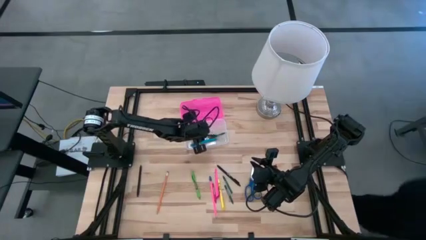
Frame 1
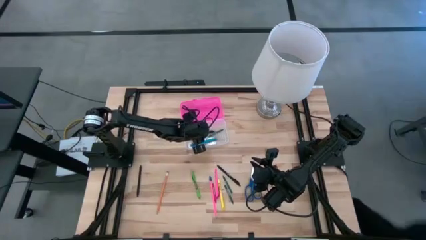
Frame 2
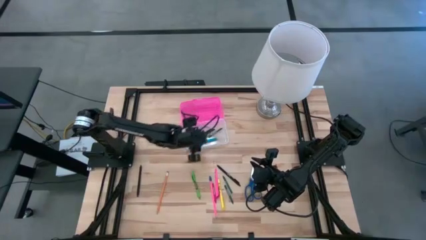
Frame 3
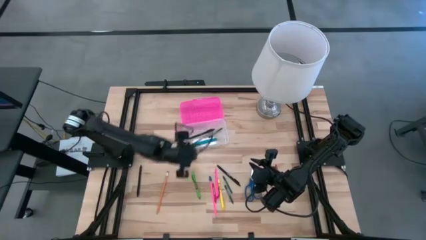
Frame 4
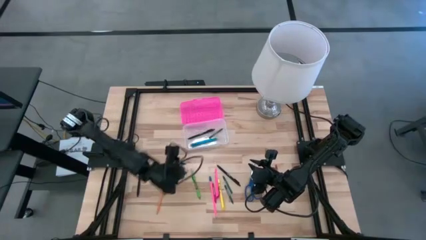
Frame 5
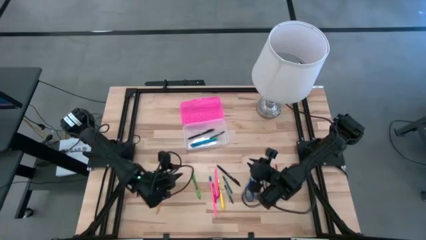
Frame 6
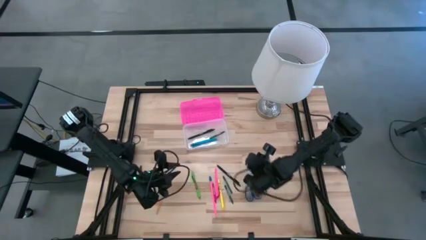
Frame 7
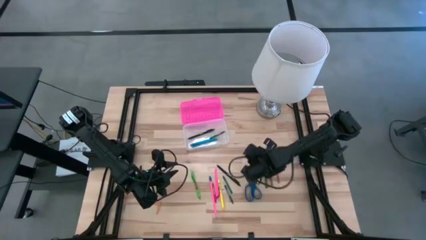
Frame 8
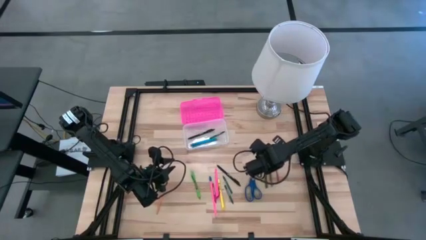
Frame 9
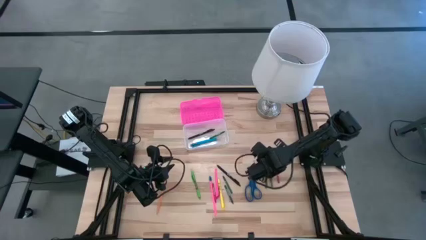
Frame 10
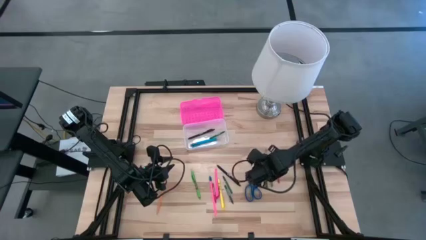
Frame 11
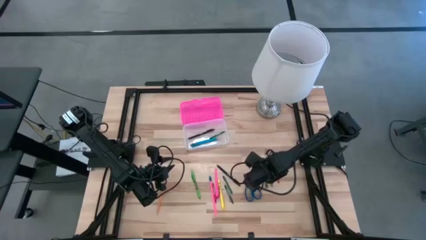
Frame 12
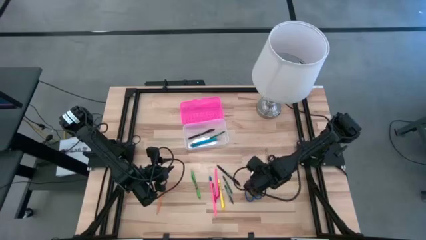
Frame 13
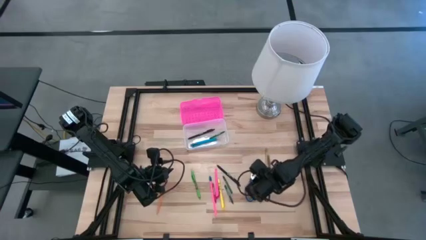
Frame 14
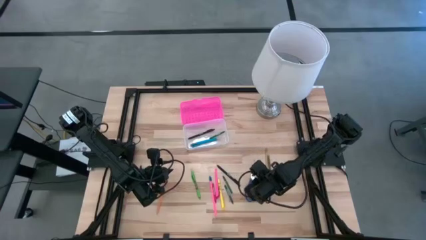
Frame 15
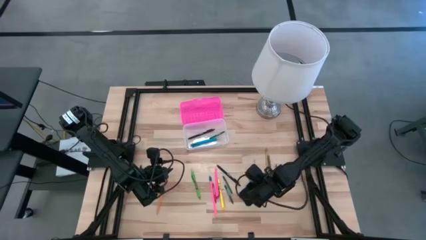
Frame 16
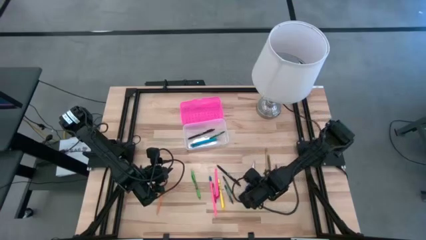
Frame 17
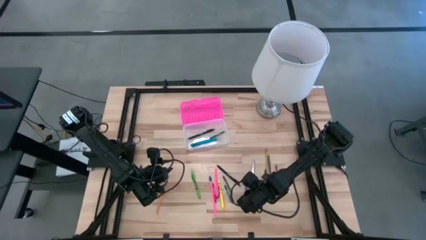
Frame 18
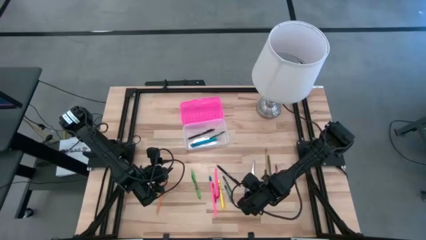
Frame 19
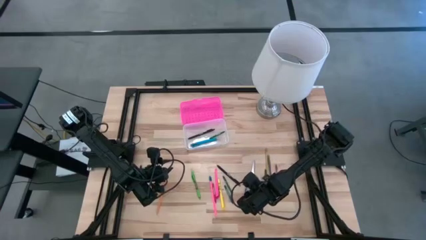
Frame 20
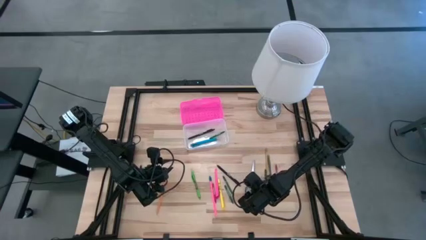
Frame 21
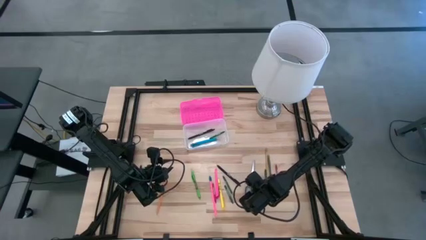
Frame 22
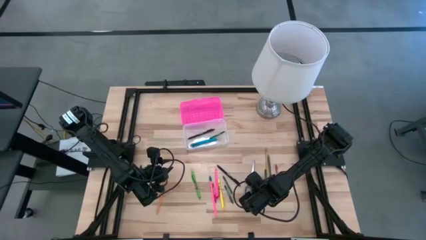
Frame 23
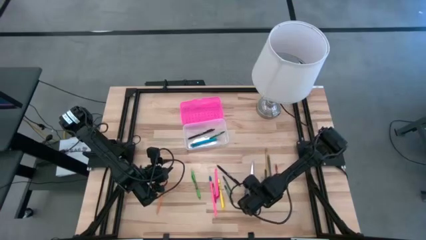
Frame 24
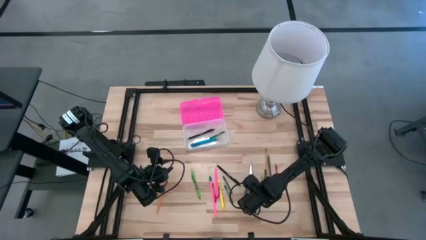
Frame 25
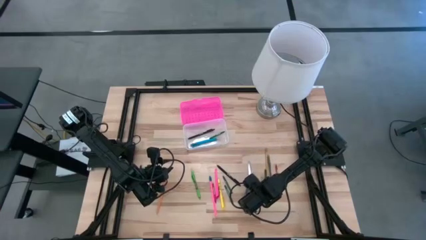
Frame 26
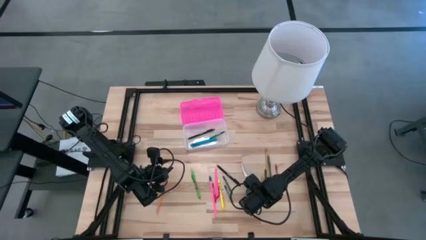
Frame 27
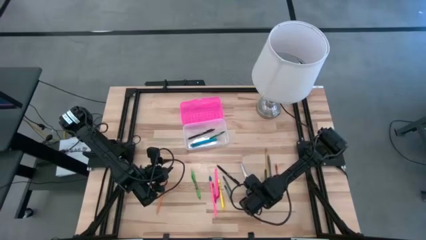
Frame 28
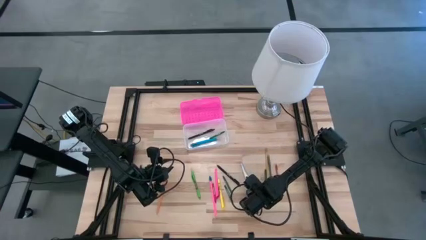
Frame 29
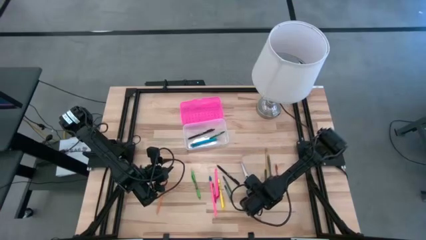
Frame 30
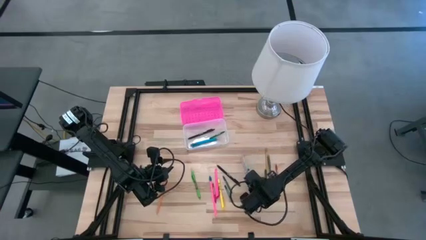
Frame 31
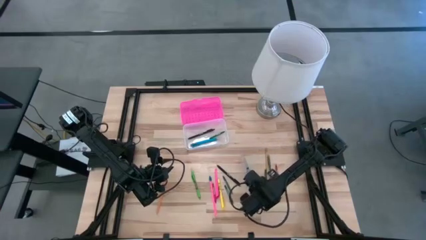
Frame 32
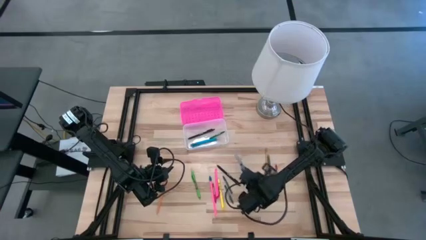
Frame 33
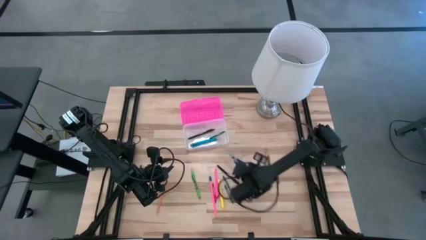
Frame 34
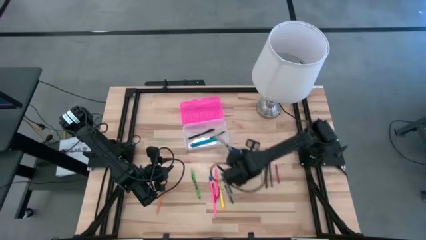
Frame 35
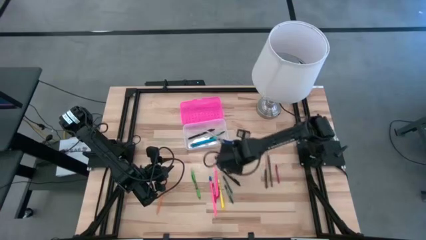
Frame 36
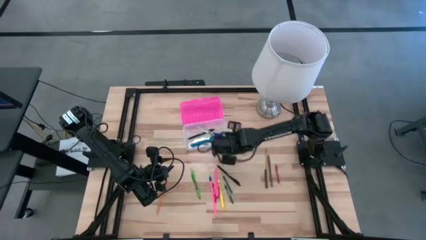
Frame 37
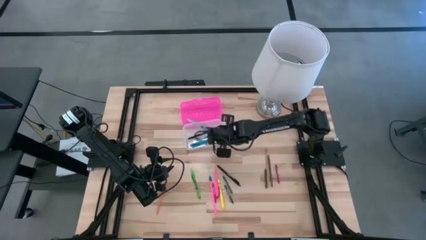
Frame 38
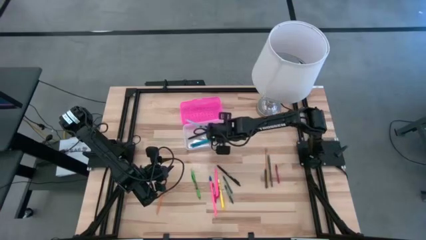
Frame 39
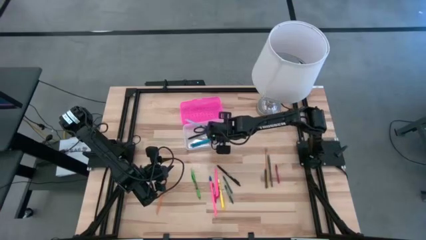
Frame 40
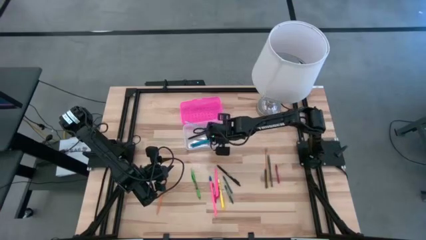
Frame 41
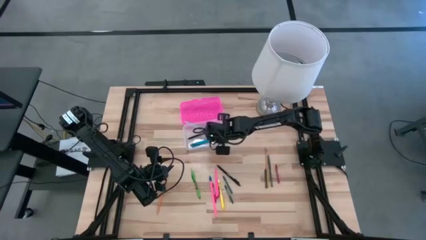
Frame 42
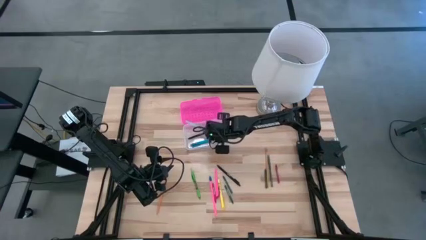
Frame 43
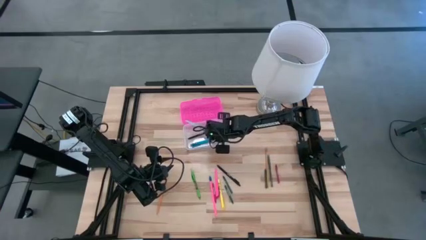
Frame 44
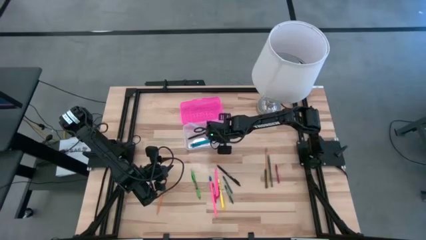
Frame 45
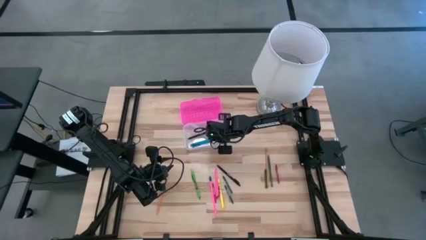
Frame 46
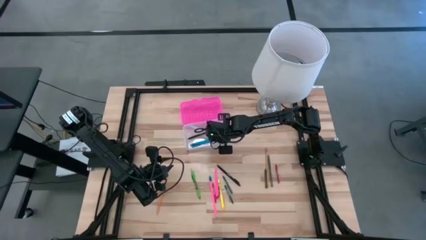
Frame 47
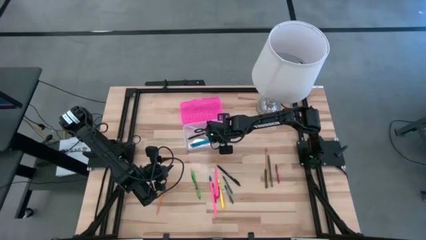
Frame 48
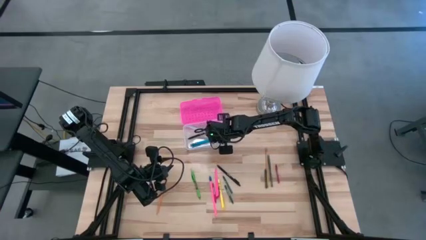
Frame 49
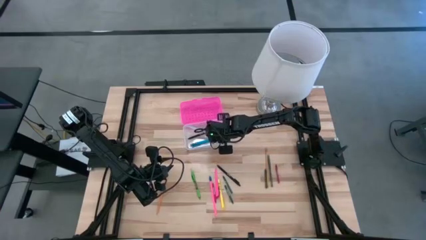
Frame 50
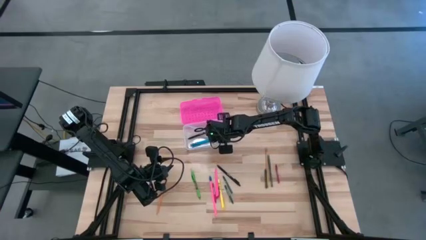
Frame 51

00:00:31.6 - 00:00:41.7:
Task: Pick & place school supplies into a supply box
Put the blue scissors into the pink supply box

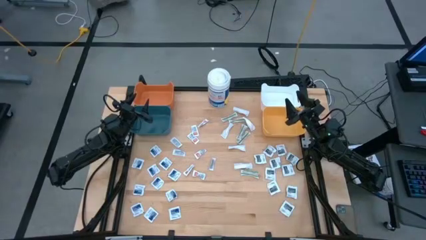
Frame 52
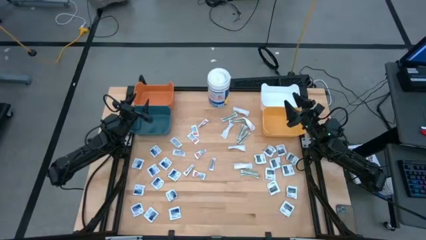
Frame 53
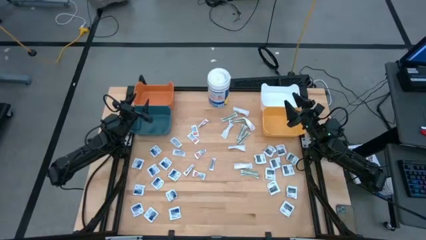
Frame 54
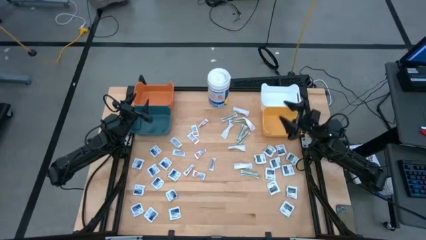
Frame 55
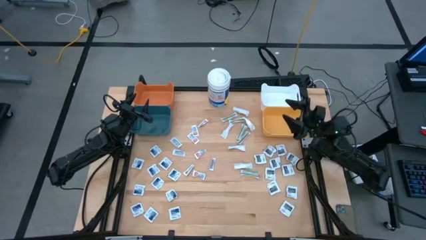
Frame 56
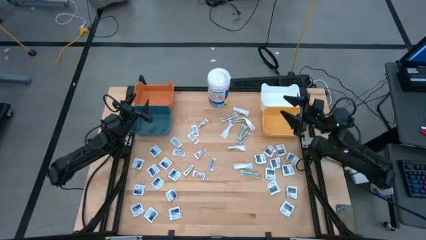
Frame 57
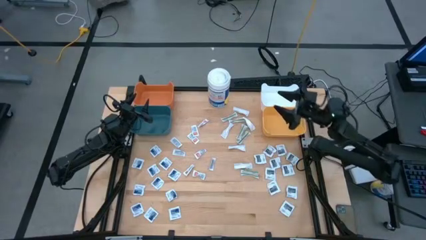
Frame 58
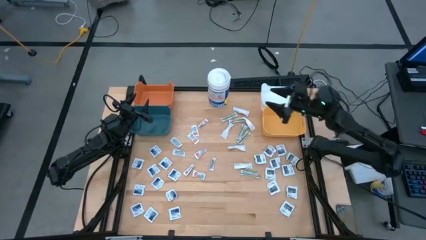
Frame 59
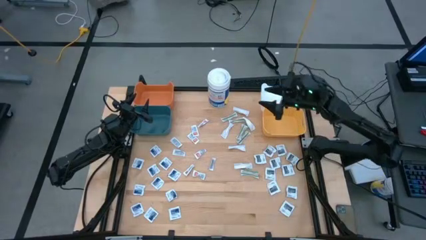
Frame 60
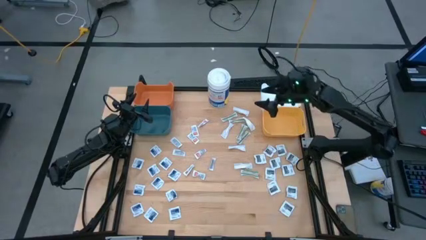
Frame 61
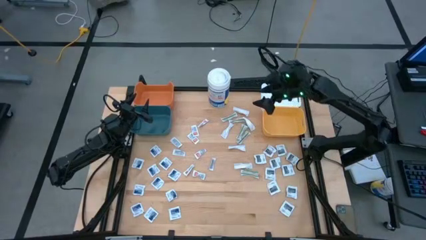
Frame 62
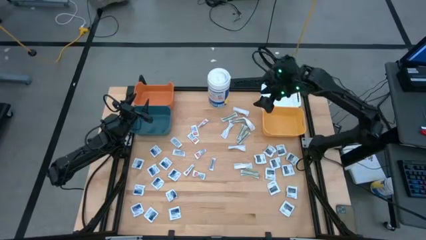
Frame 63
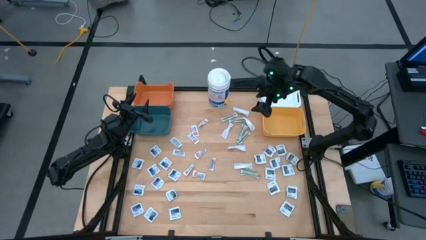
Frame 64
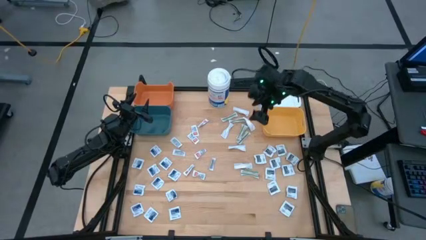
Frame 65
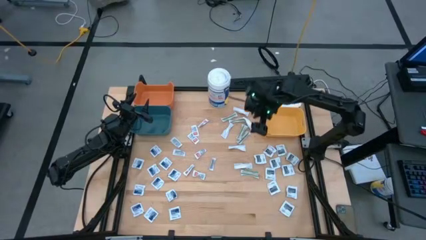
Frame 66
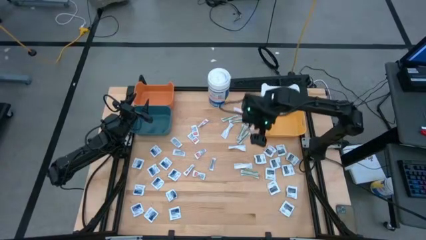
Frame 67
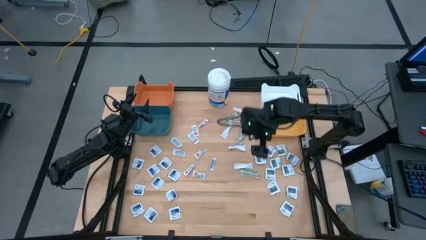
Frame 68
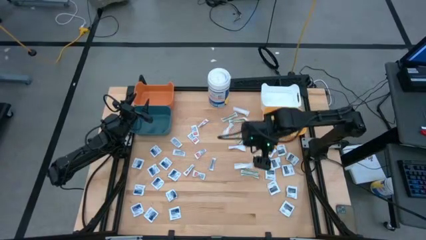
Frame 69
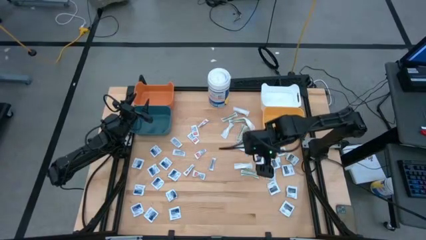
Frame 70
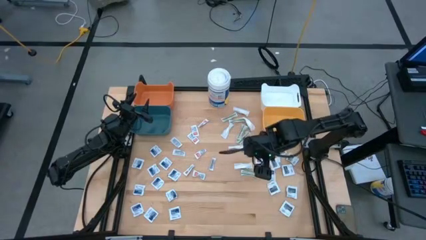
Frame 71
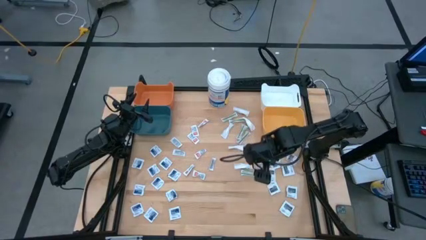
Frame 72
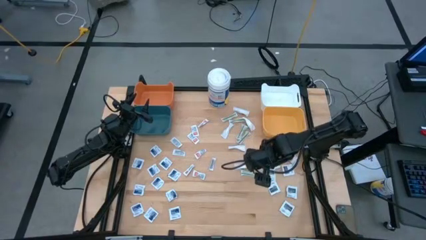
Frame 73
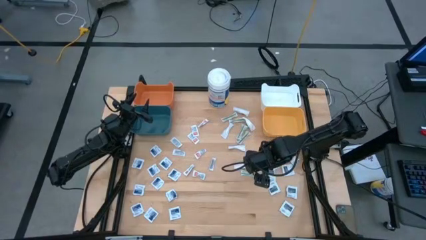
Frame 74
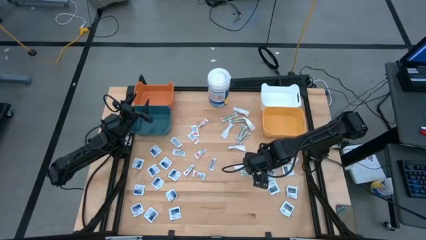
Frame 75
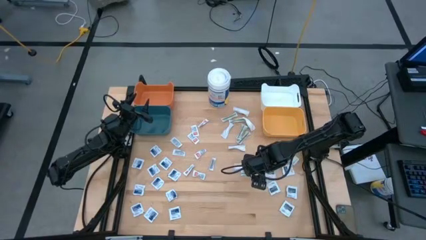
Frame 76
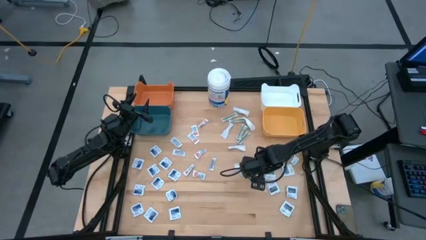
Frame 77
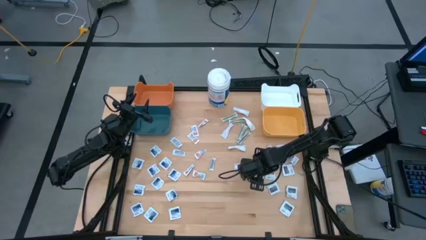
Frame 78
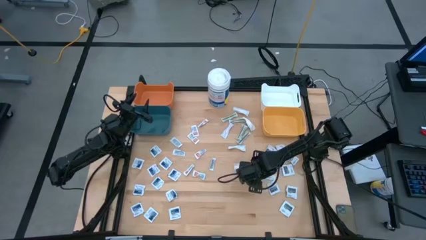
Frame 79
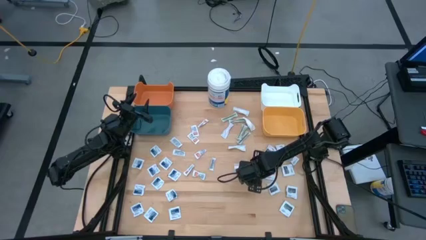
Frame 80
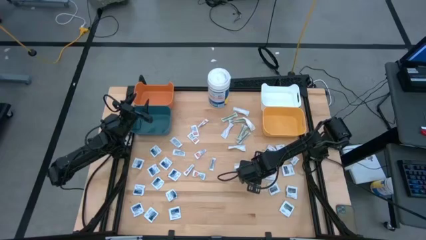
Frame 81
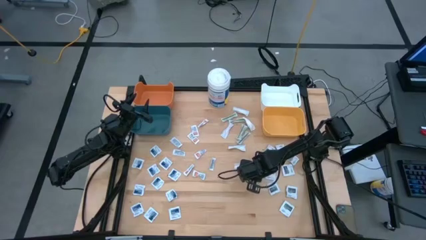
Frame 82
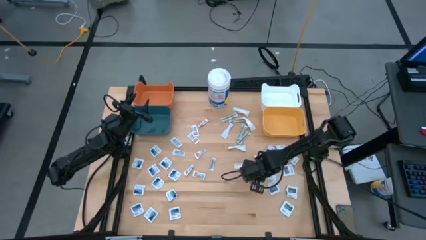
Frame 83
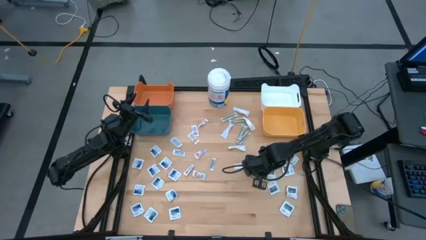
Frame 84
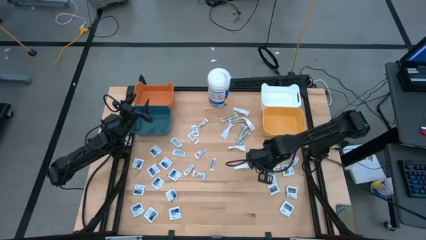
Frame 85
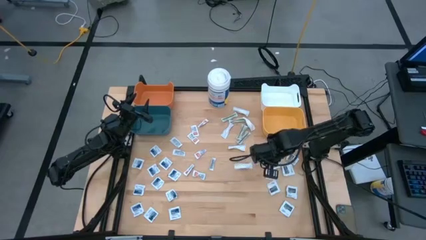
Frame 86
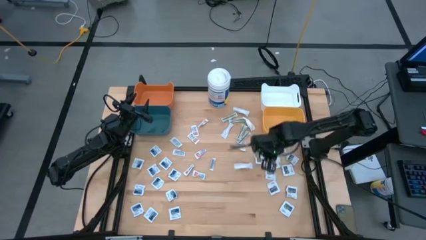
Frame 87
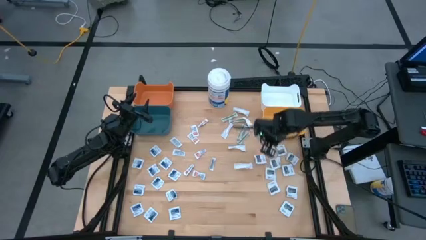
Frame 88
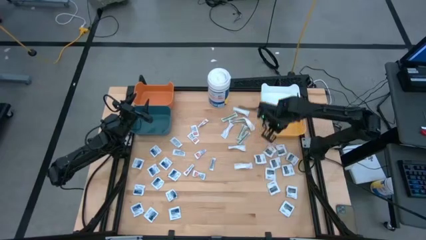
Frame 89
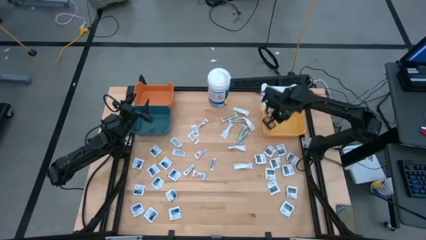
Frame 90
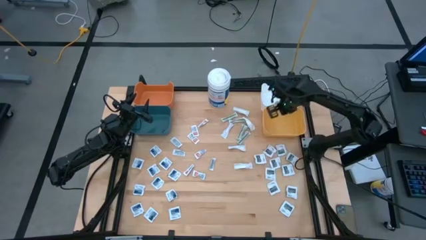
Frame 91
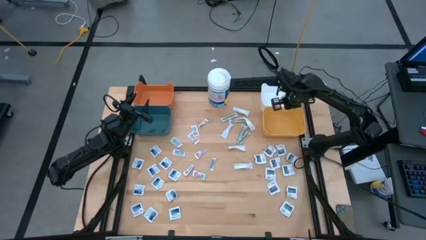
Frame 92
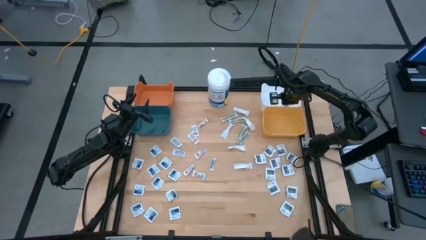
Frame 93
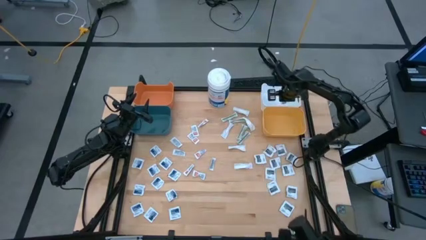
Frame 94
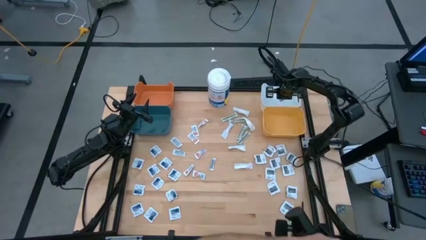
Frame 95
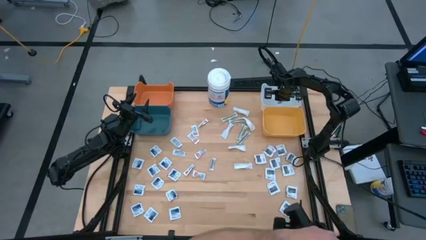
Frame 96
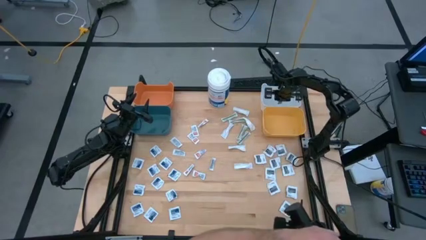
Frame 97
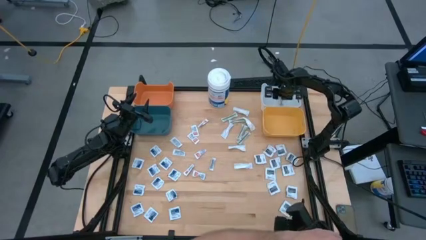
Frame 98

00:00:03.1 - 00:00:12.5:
Task: Pick & Place First Aid Supplies
Put the green bandage into the white bin
